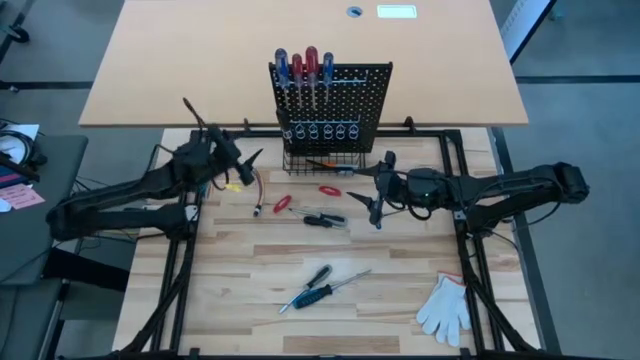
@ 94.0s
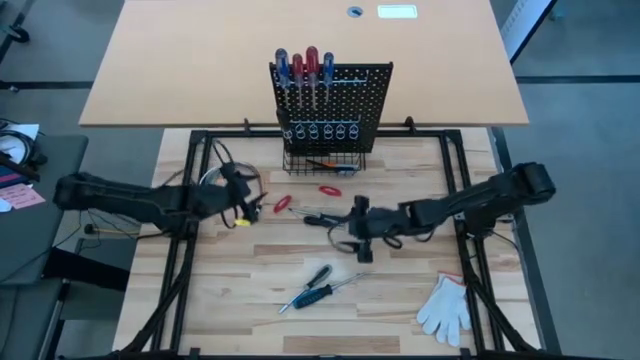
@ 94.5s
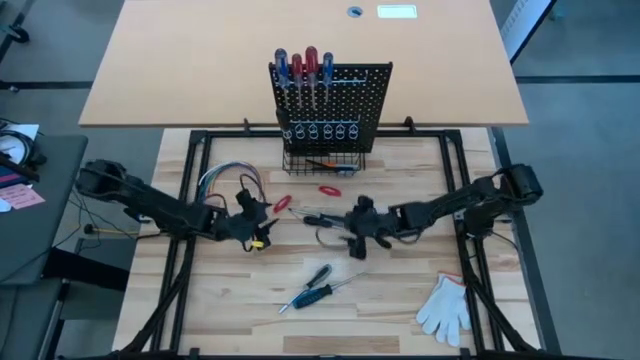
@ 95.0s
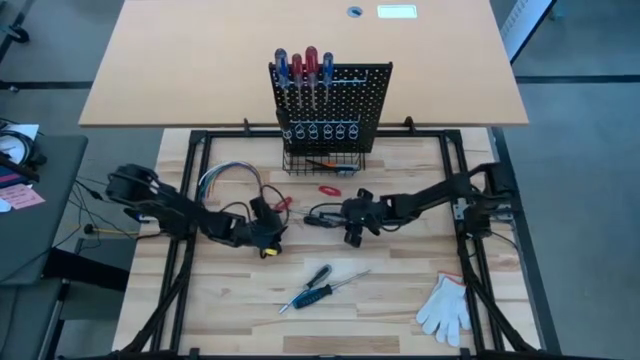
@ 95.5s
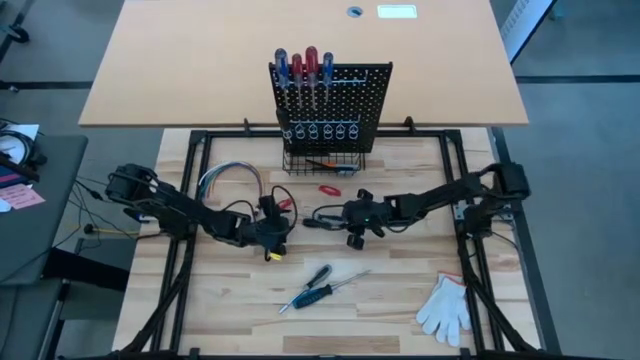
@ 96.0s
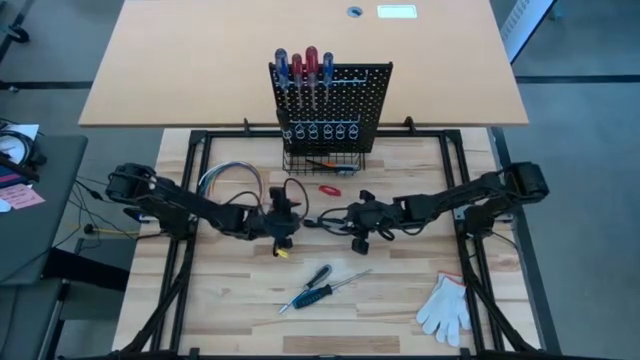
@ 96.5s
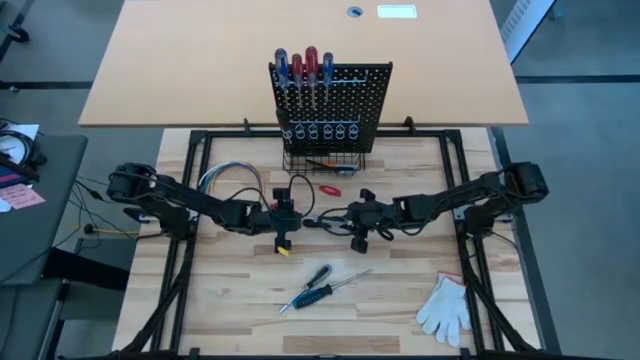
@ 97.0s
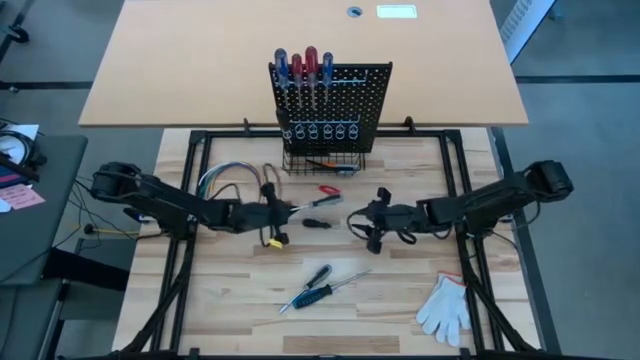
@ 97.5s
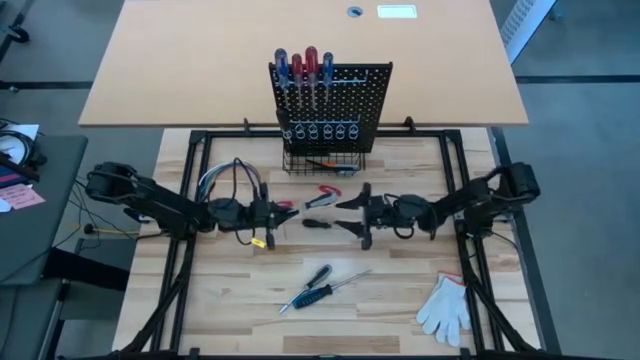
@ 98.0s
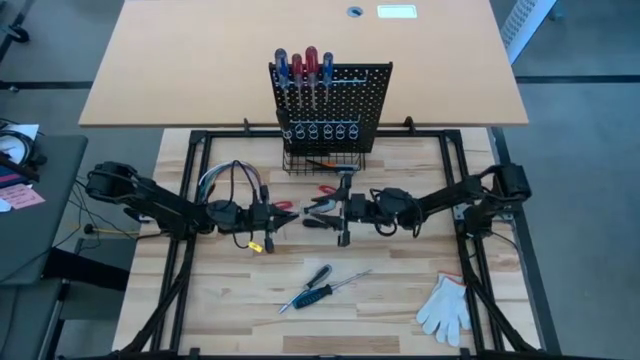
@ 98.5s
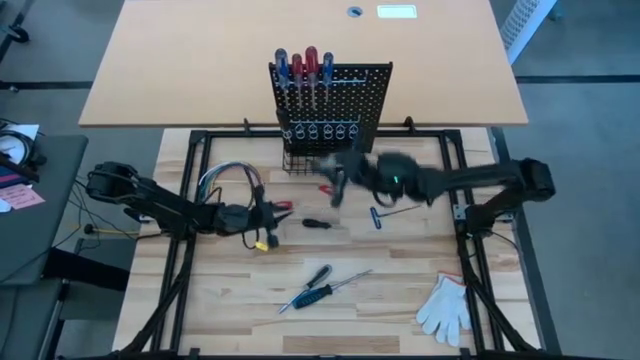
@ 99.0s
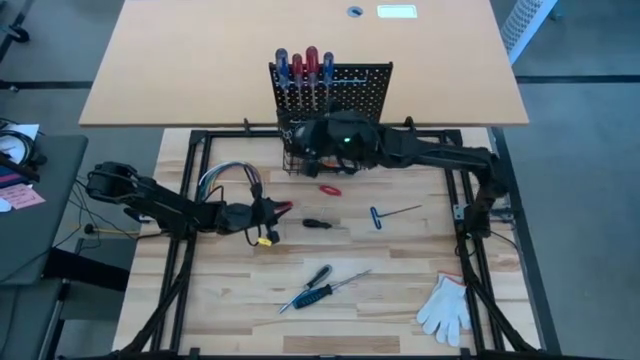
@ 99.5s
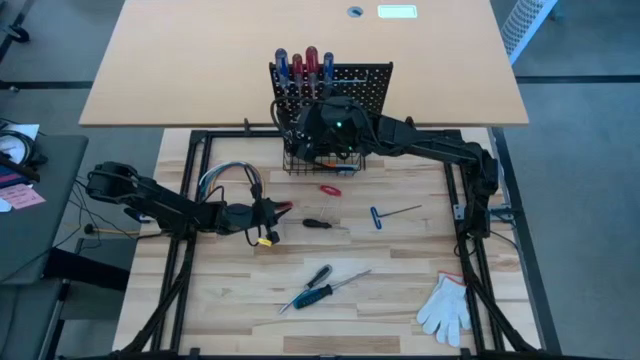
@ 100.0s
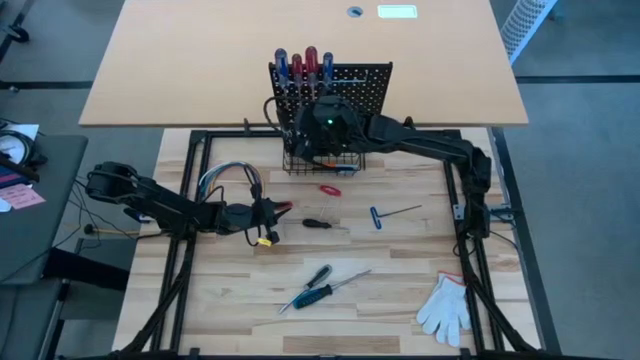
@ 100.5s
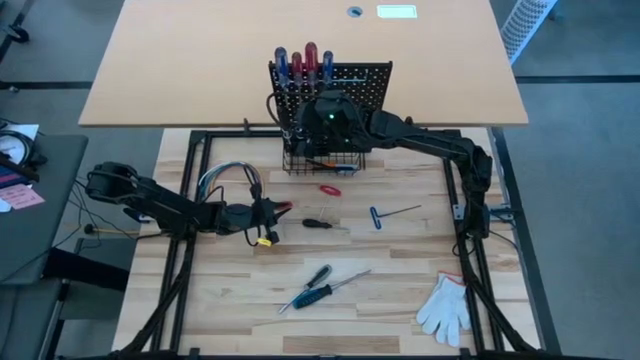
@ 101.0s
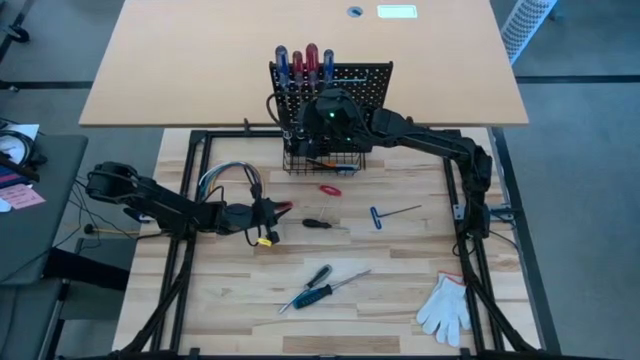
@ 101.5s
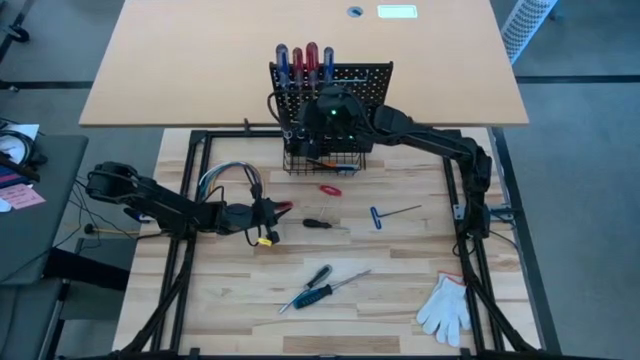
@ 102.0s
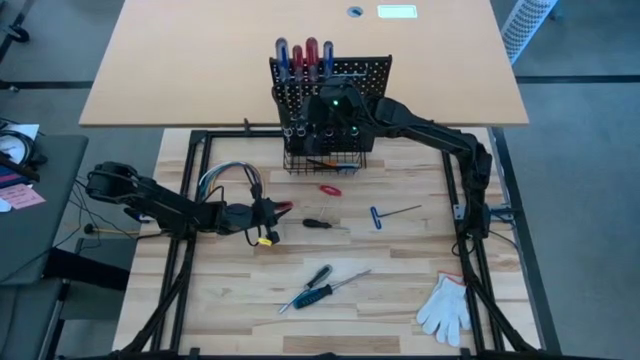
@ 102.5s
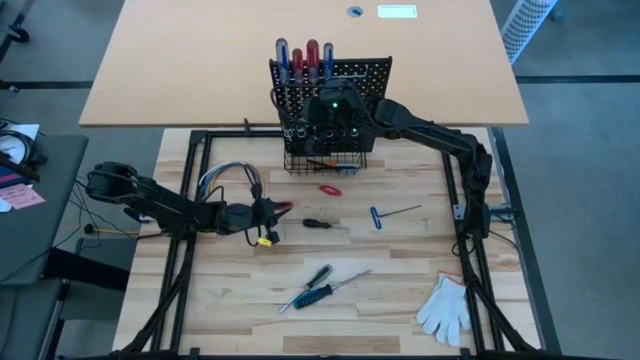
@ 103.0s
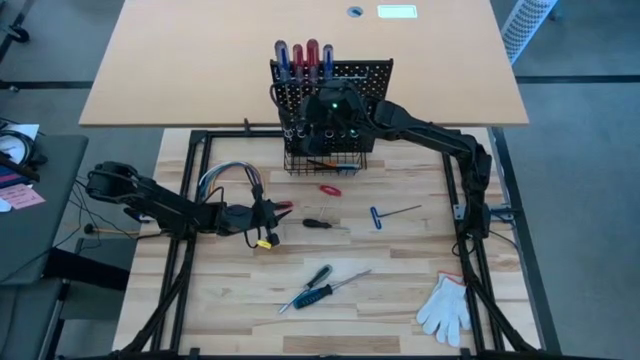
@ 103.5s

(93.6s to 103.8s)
Task: Hang tools onto peg board
Hang the top gray screwdriver on the pegboard

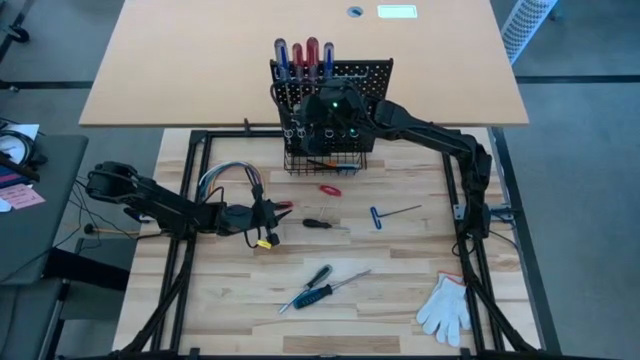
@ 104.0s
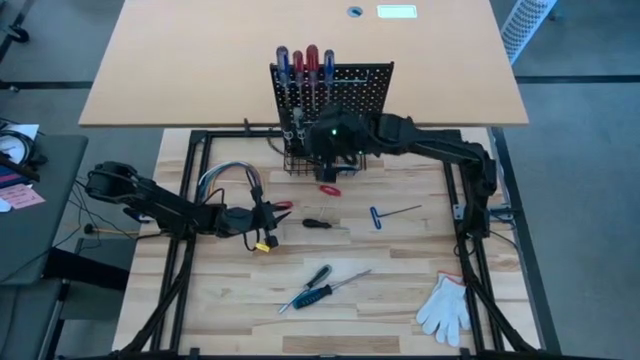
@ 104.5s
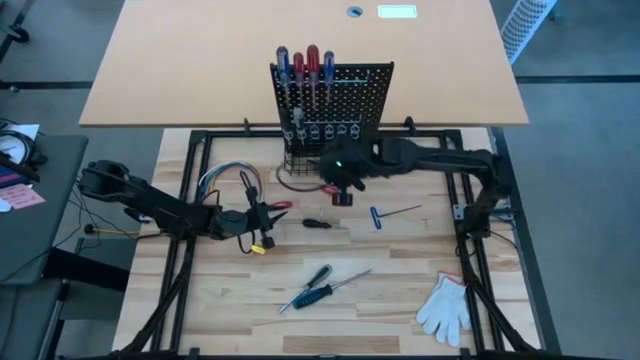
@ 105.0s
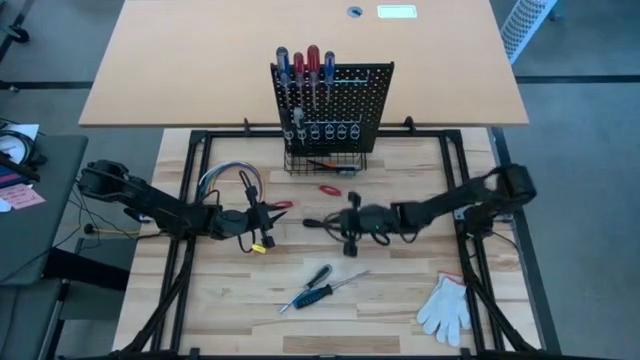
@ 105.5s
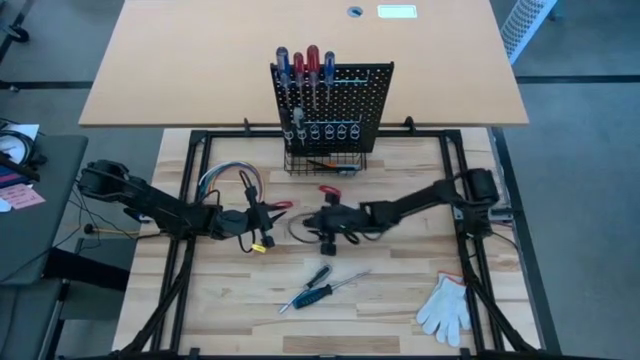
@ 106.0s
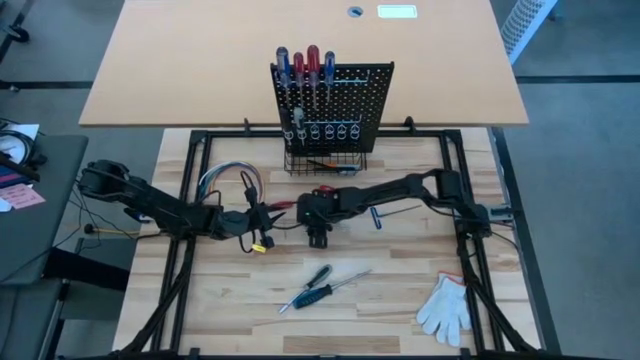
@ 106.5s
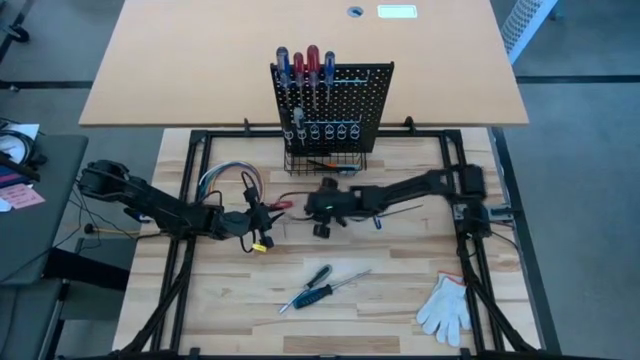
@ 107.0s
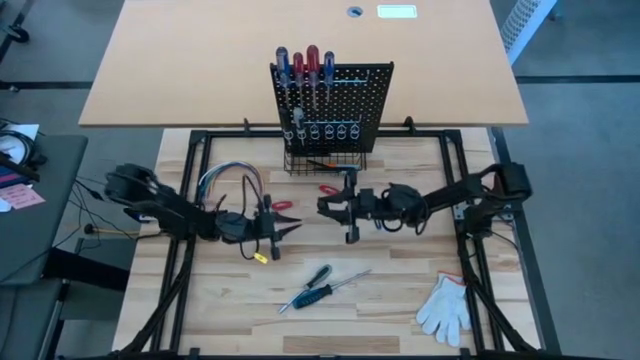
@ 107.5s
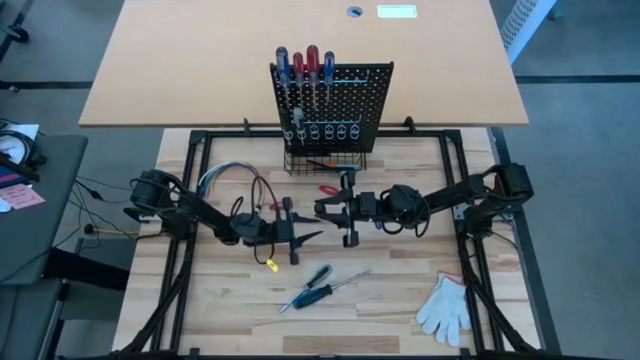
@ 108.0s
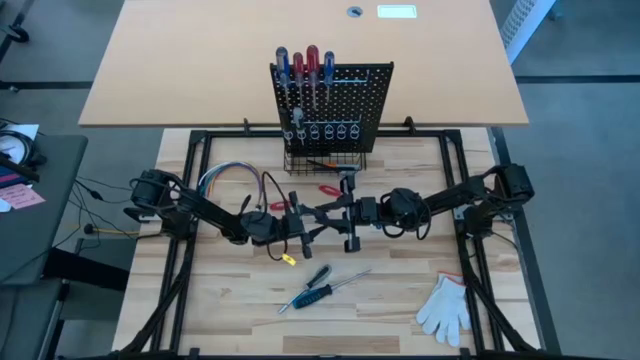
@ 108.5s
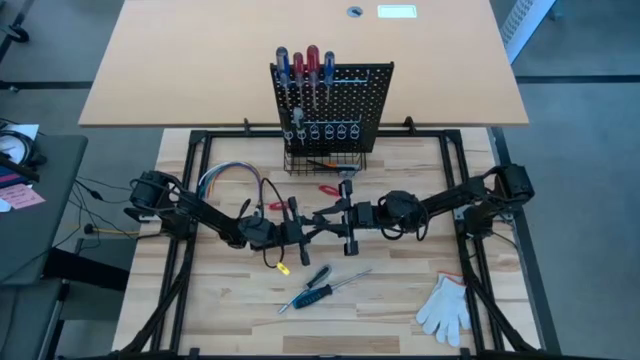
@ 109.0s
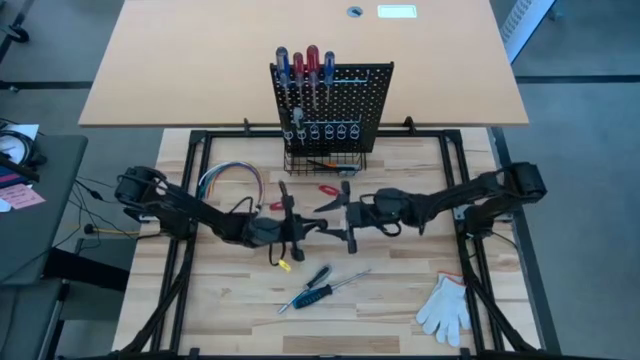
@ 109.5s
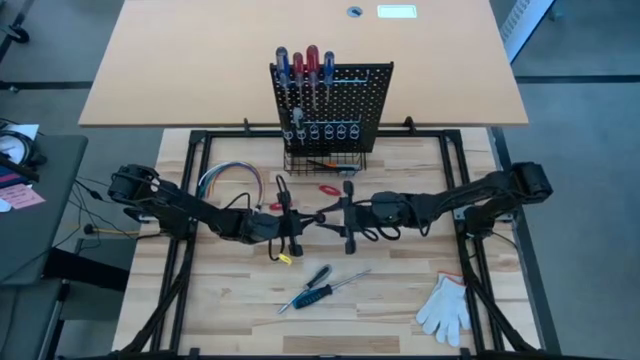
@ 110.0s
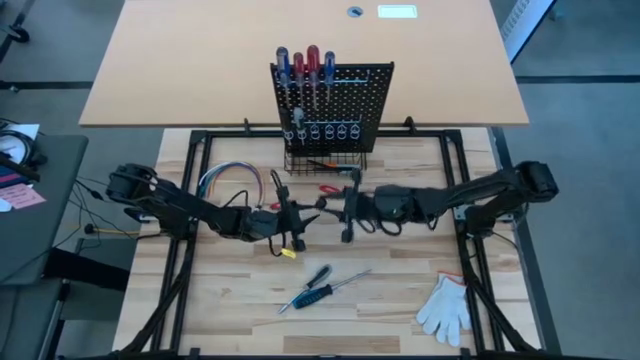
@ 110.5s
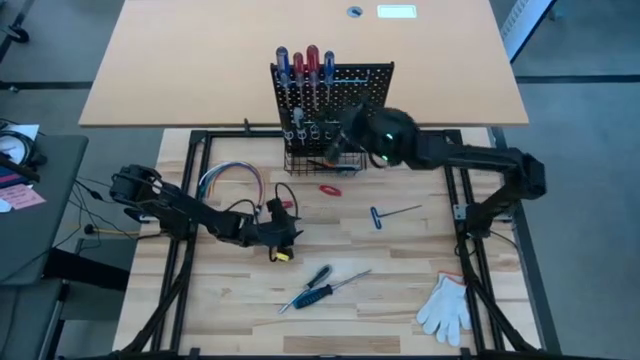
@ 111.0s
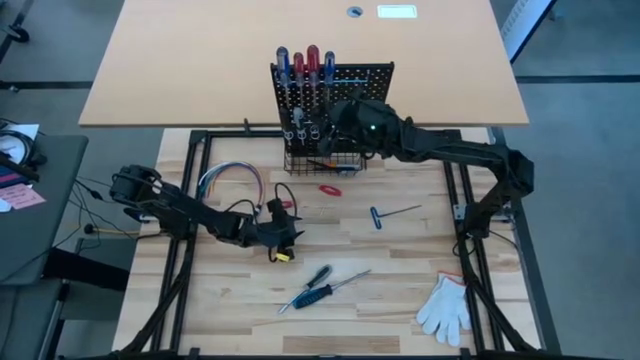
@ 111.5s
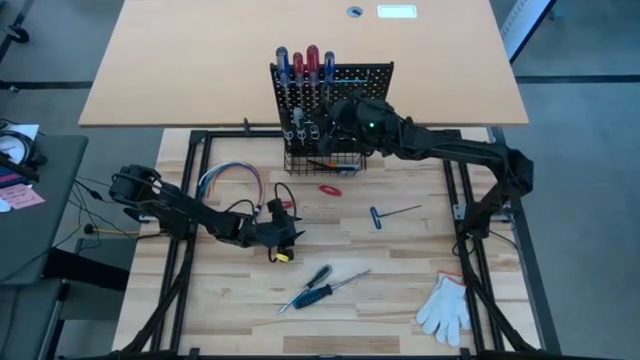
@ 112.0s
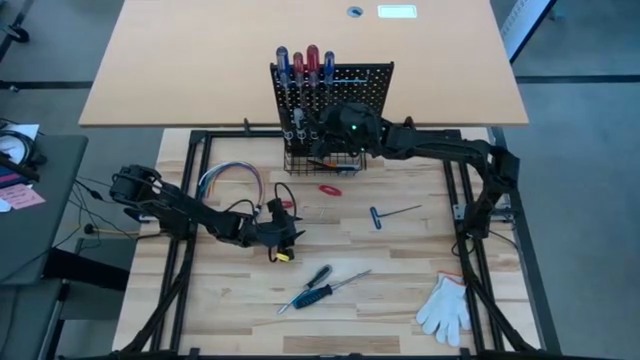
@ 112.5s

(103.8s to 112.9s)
Hang the black screwdriver on the pegboard

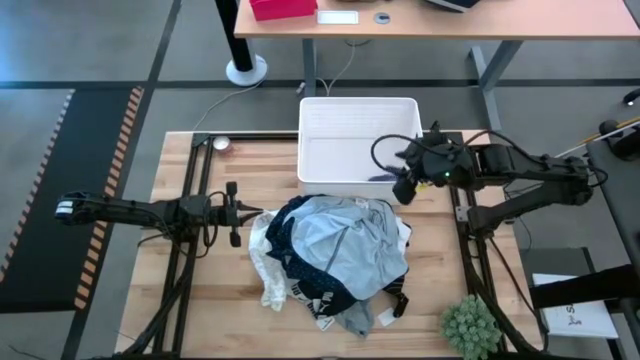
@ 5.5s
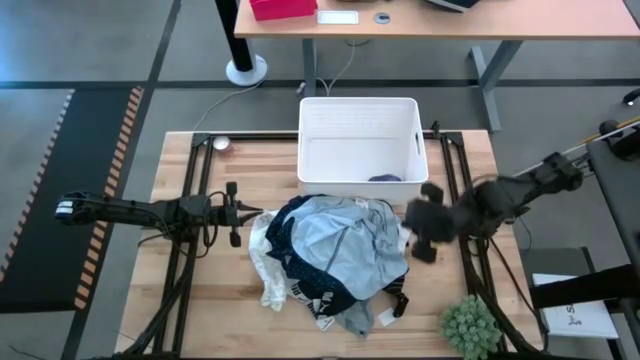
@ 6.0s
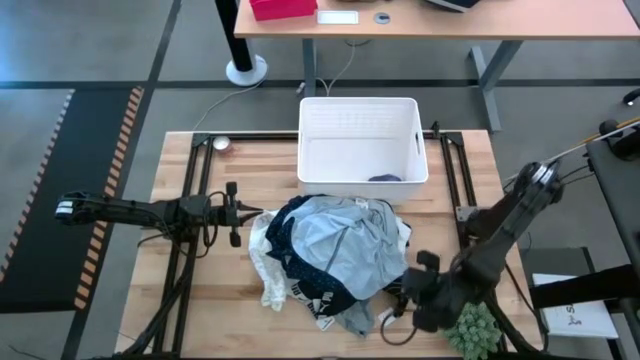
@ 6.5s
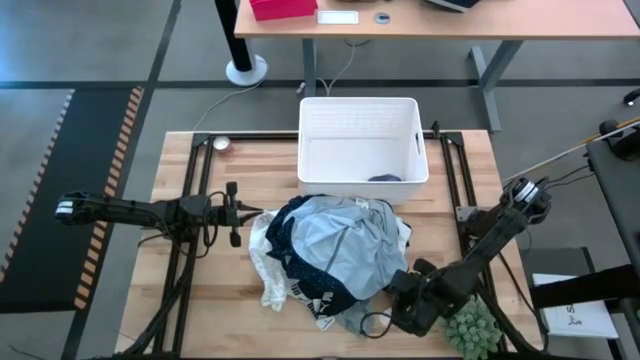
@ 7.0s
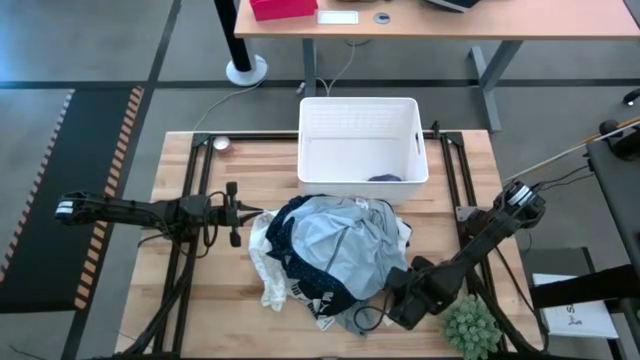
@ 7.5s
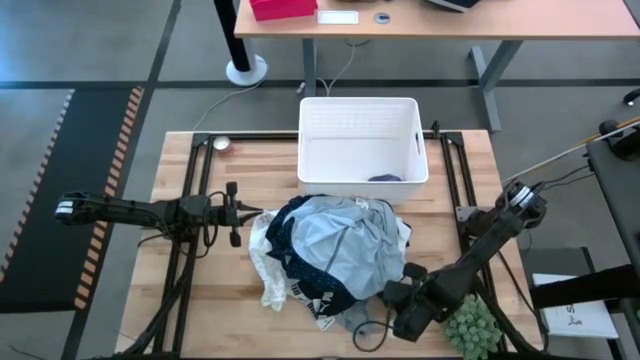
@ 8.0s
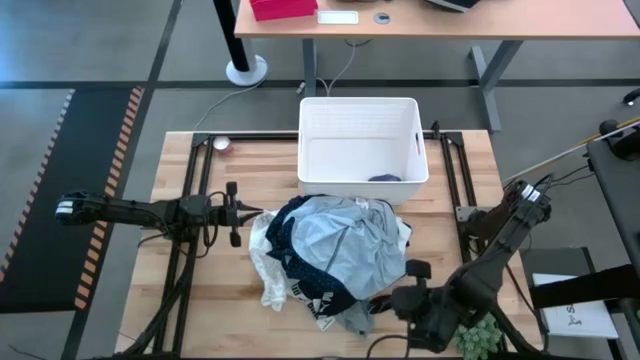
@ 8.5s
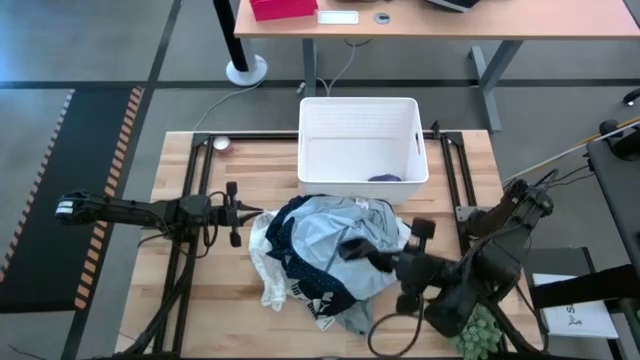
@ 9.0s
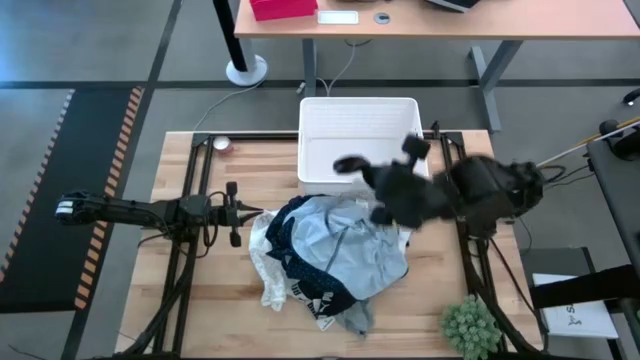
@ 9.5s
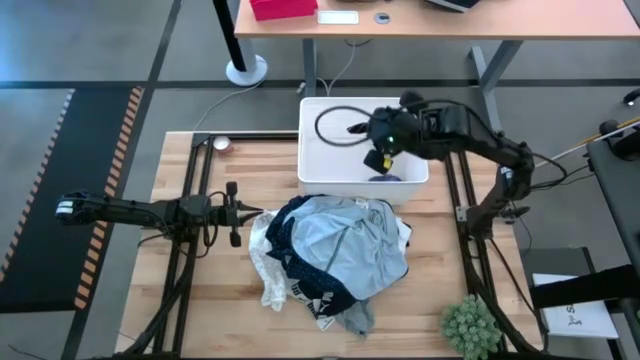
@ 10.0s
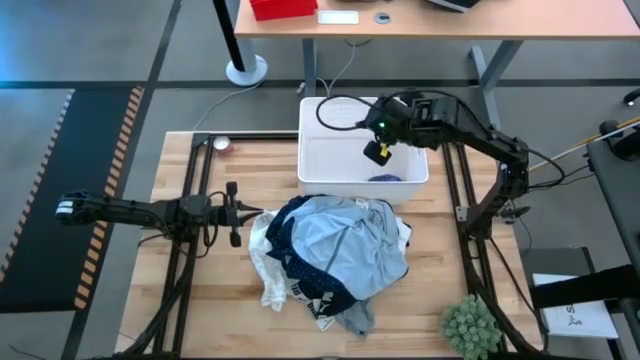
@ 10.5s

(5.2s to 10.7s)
Task: Sort clothes
Put the black sock into the white laundry bin
